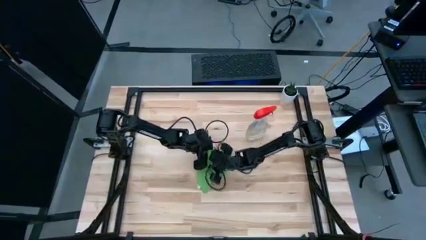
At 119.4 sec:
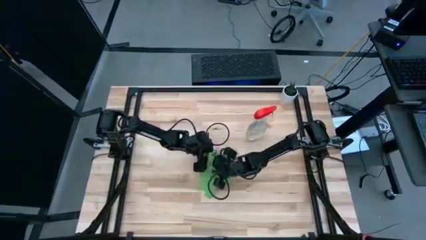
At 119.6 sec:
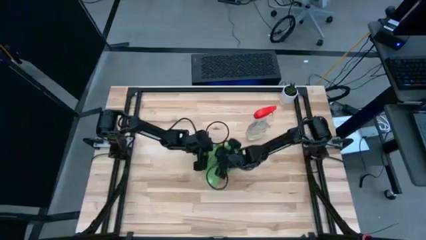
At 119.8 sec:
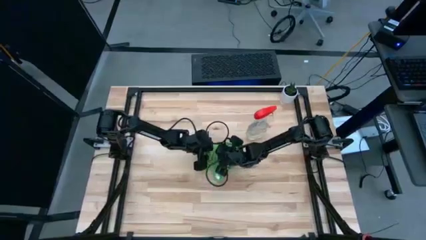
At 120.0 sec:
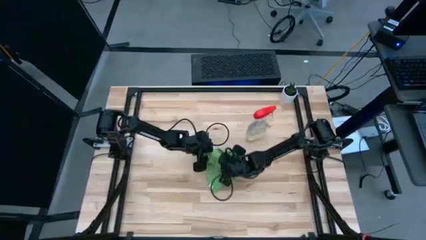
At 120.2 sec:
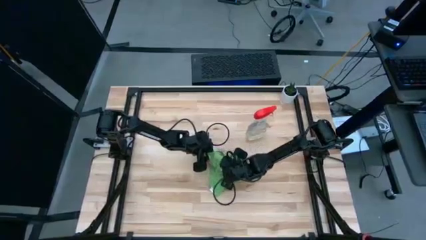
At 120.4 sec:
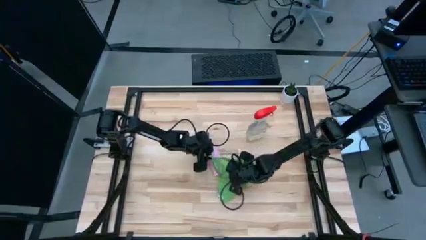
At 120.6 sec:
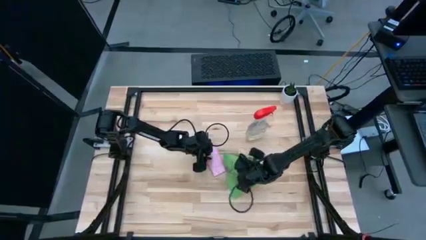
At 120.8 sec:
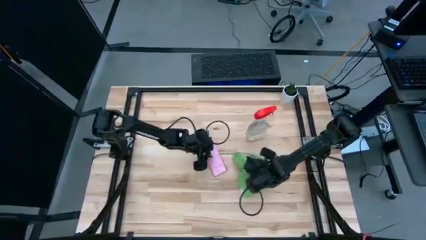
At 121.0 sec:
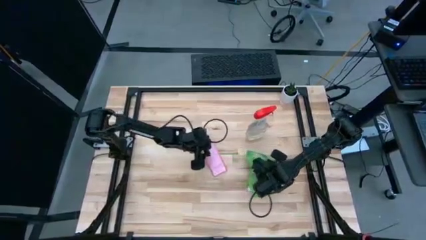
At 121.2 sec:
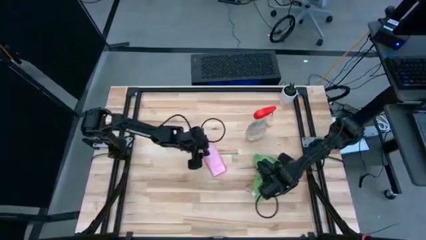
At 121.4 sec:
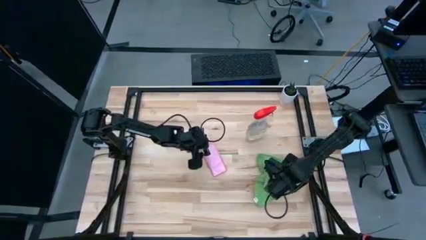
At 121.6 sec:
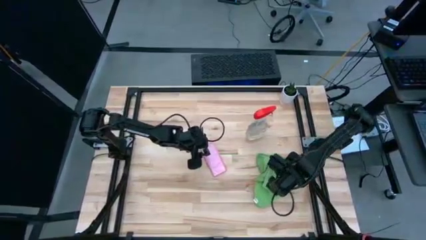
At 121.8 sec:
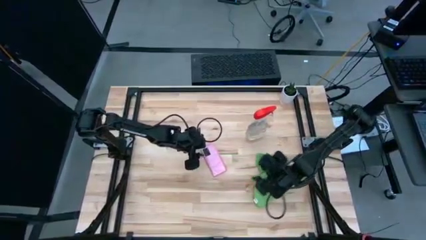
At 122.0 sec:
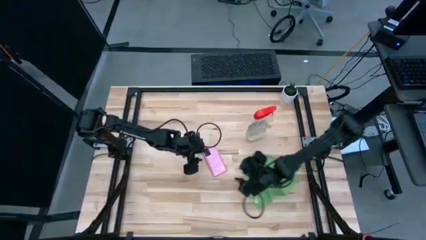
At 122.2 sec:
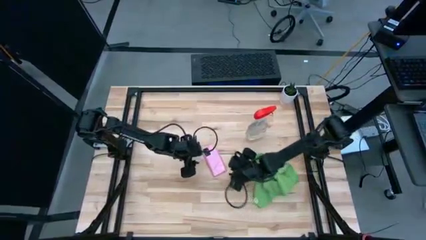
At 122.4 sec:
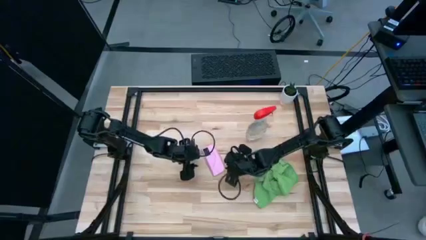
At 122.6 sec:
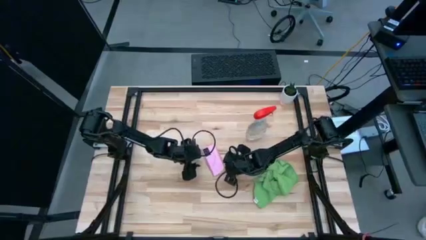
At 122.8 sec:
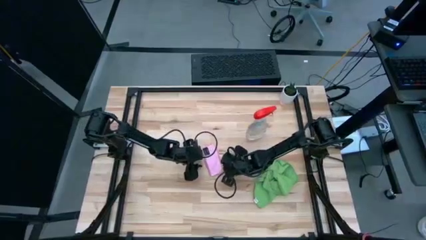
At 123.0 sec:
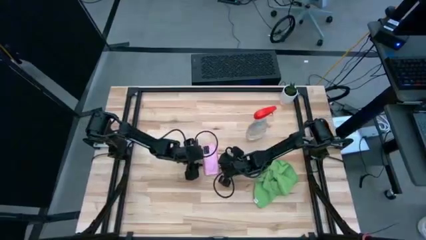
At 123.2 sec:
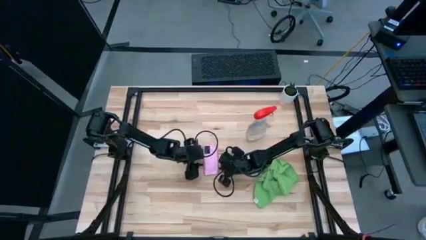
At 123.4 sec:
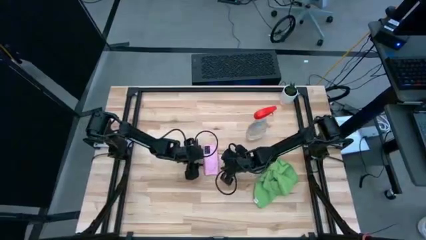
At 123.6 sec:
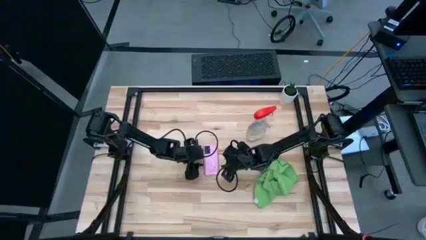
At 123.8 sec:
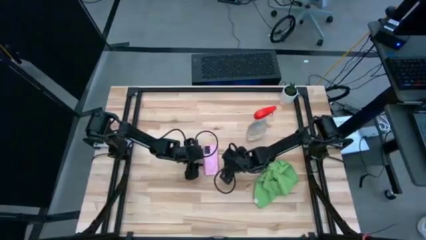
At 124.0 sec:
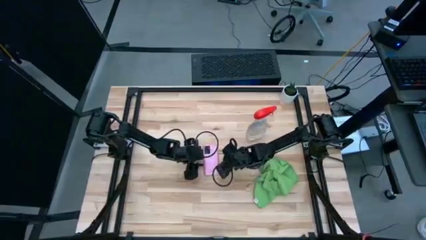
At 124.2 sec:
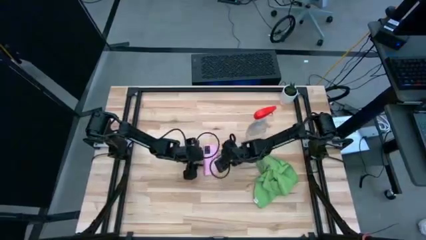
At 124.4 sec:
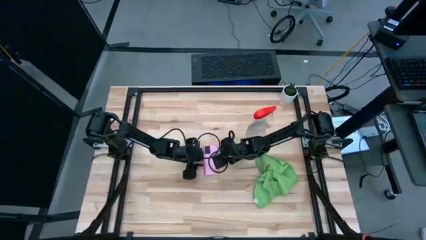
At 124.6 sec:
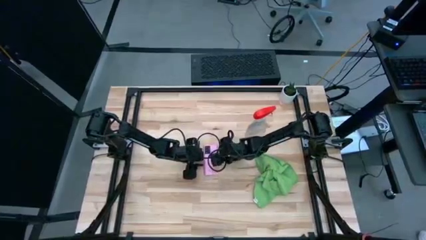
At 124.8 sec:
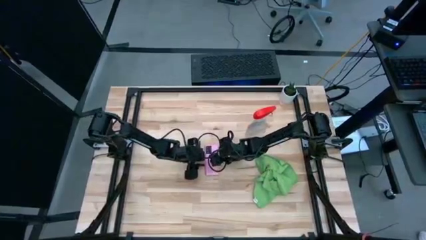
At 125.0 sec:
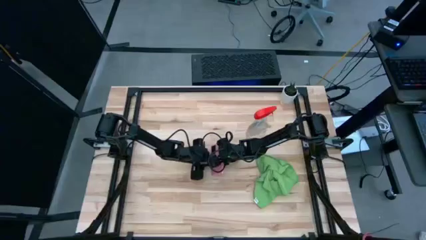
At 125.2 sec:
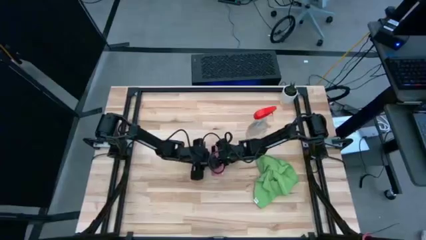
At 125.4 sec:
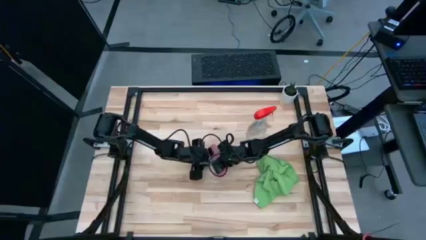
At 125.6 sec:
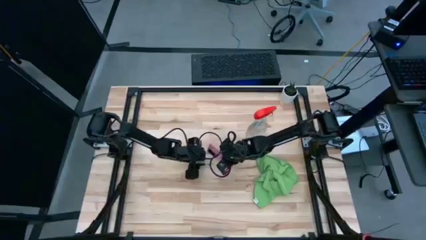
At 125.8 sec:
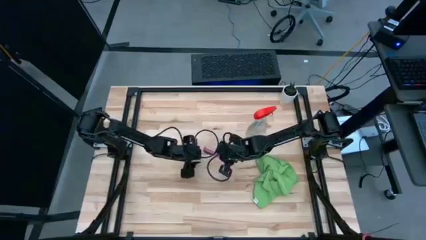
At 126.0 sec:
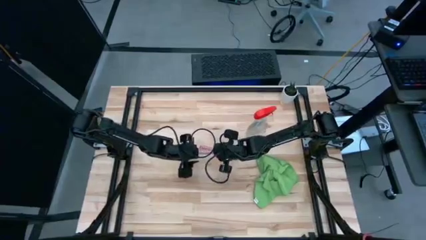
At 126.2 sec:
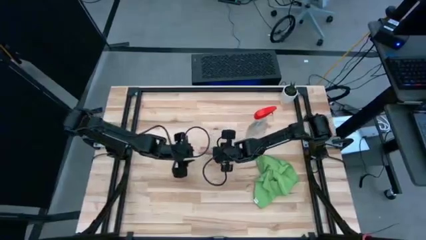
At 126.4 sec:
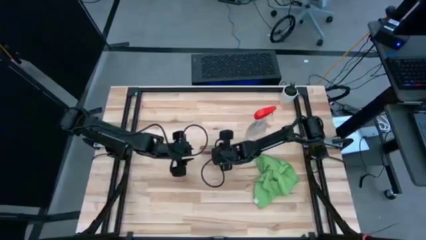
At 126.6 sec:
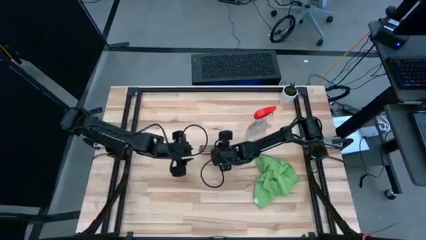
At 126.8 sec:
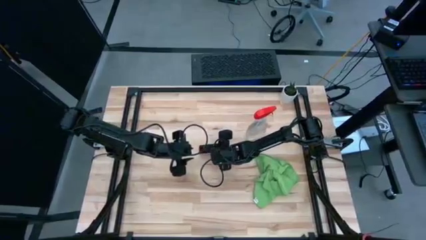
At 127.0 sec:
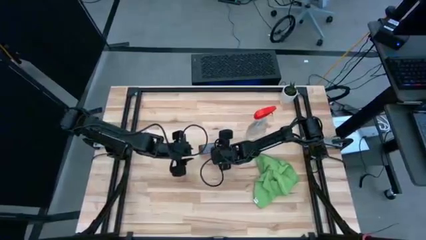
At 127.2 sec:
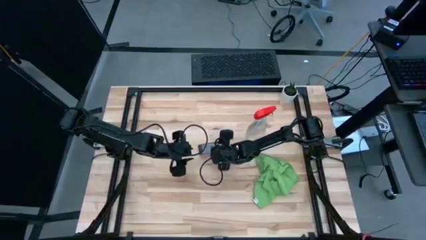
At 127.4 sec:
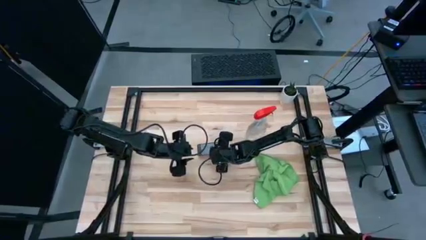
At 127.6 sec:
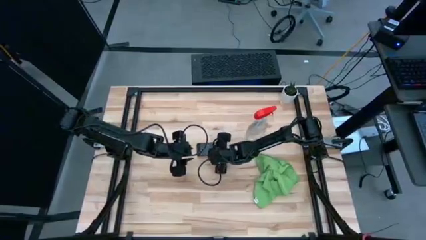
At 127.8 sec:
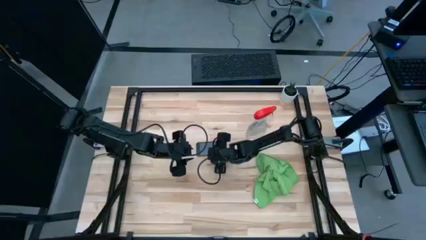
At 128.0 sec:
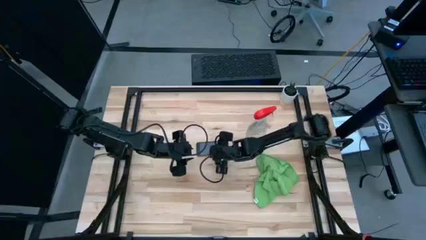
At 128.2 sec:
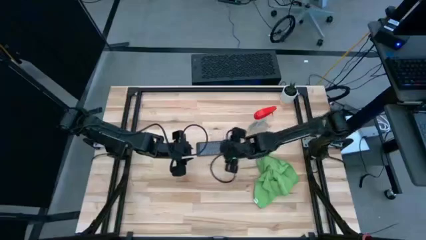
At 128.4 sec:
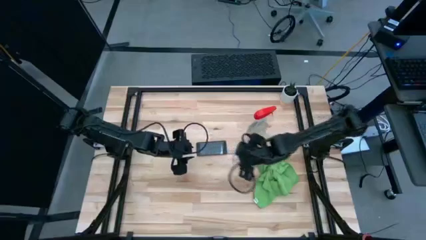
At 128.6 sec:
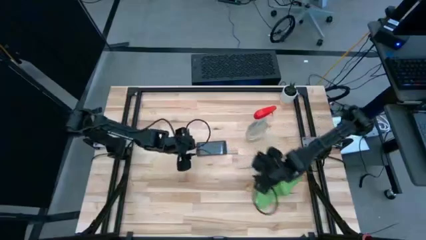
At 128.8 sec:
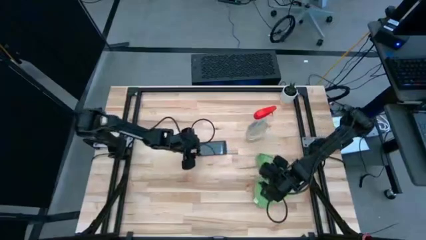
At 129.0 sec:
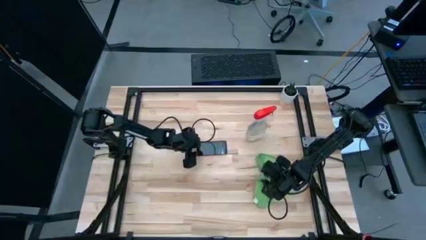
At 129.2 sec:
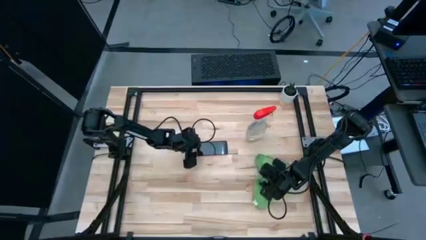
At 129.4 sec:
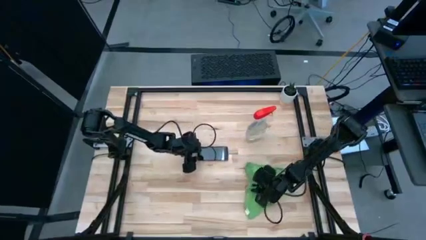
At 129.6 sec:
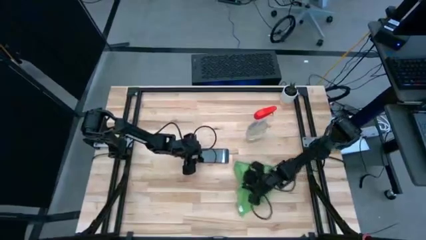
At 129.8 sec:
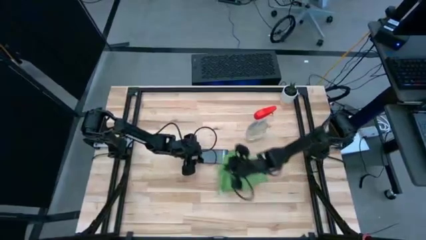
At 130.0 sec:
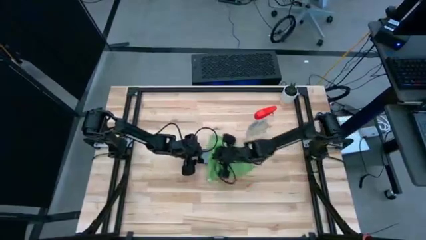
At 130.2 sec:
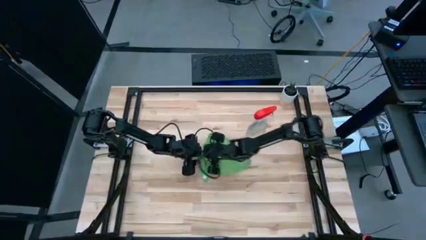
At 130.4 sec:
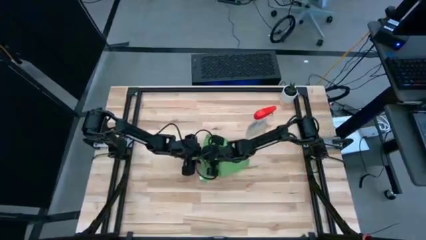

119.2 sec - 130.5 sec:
Task: Apply microfiber cloth
Wipe the back and front of the cellphone with the green microfiber cloth

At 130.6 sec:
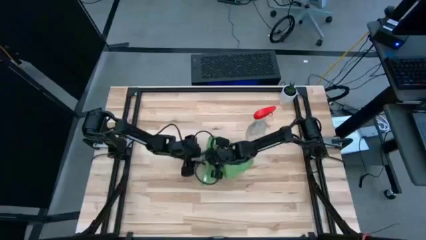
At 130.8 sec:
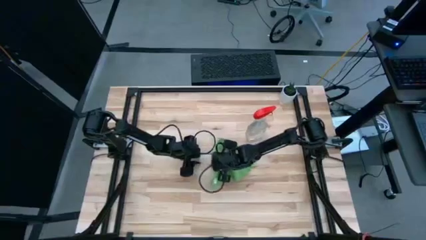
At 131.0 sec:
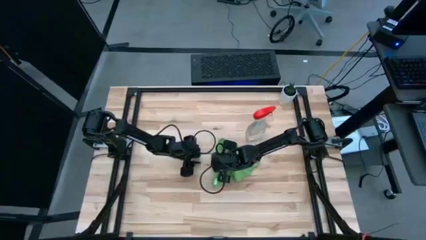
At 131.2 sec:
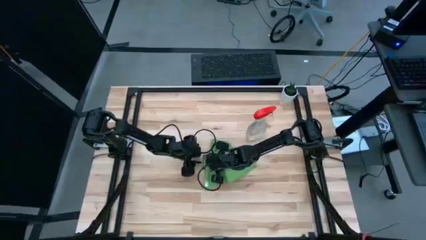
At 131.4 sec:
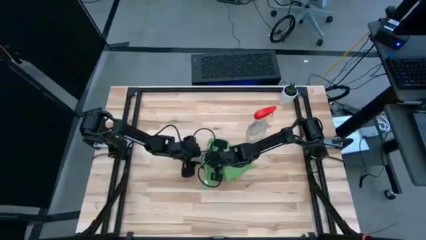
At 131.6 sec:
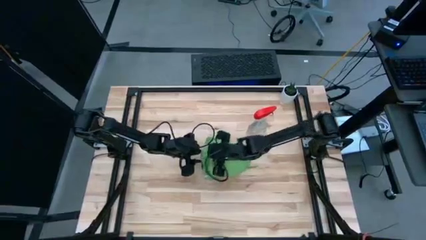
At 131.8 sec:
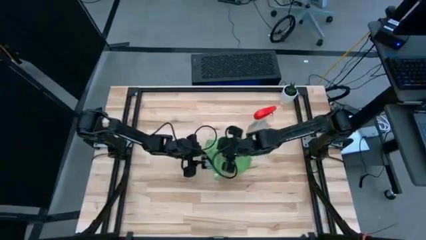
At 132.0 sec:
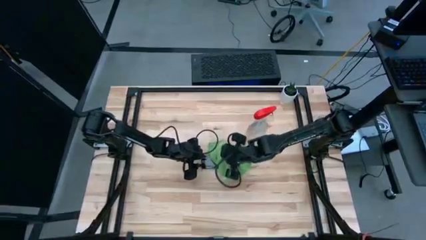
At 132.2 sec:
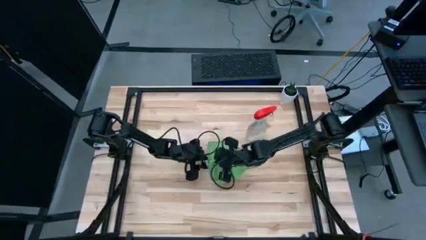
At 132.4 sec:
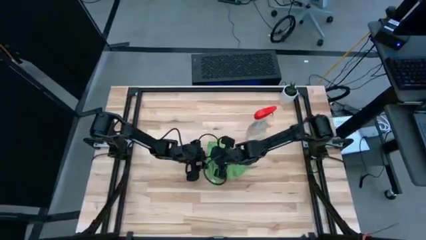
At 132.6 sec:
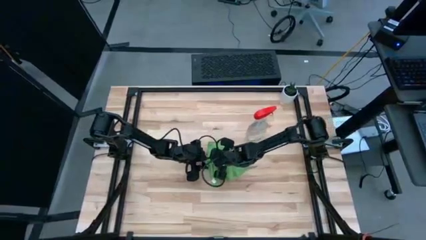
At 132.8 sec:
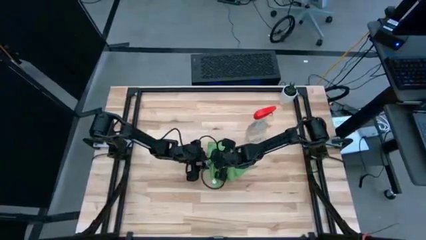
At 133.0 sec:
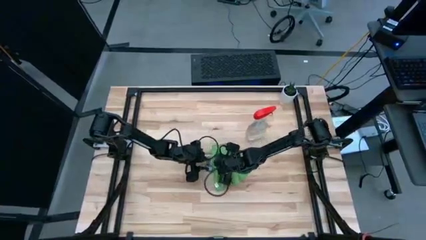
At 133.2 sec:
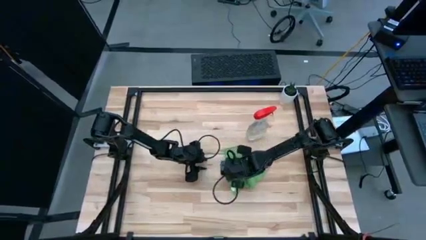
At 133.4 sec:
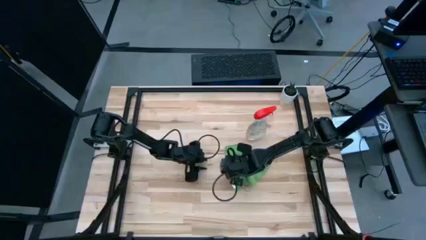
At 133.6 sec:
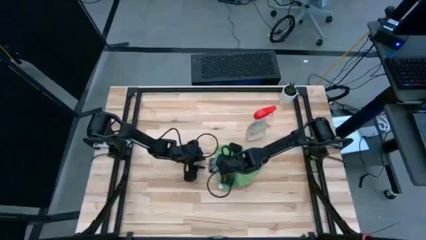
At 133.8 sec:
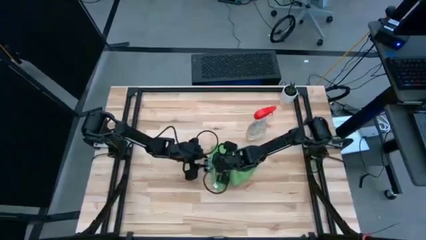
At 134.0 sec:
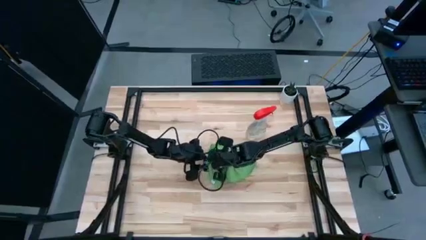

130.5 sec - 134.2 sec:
Wipe the back and front of the cellphone with the green microfiber cloth

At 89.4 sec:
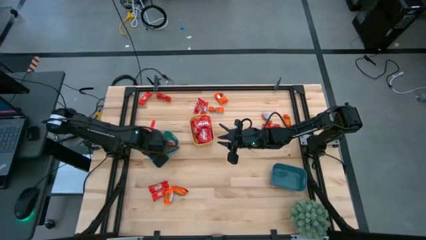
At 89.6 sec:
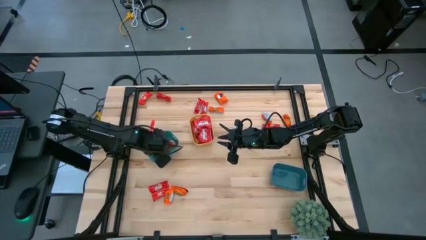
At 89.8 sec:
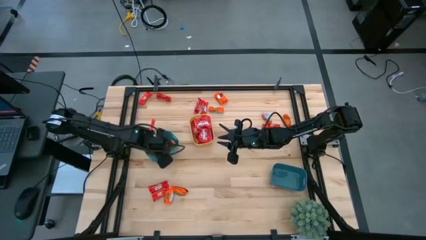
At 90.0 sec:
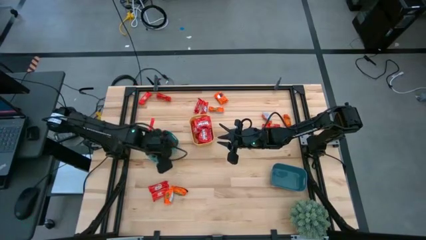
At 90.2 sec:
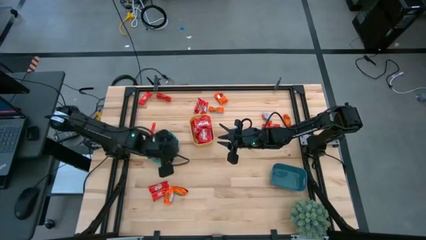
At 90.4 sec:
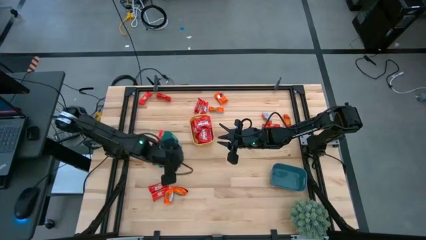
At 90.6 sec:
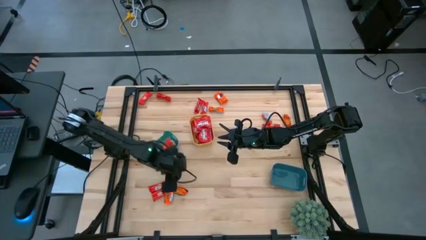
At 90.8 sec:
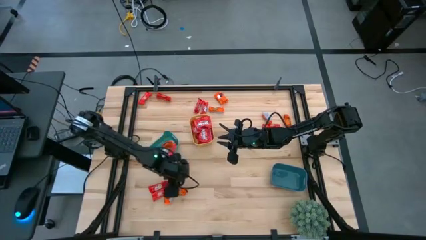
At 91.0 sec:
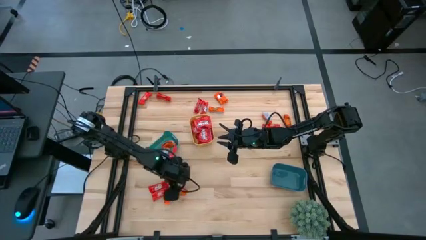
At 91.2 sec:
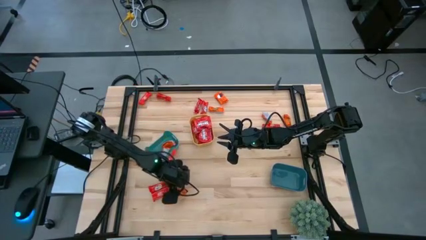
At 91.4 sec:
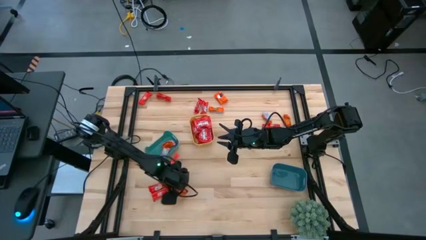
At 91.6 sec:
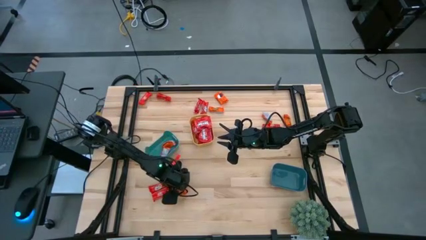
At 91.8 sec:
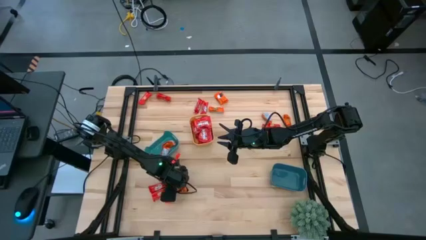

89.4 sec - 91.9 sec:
Task: Sort candy
Put the orange candy into the green bin
